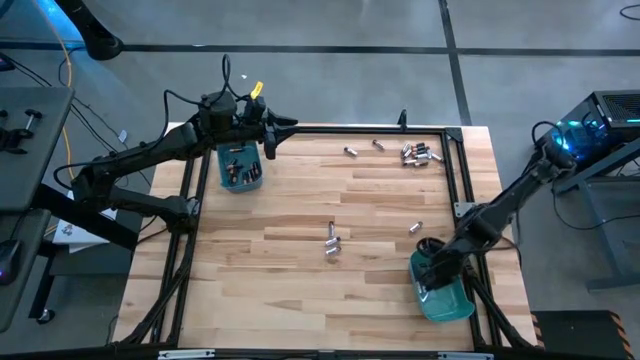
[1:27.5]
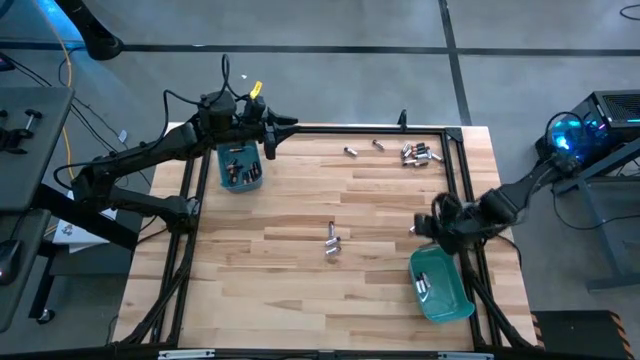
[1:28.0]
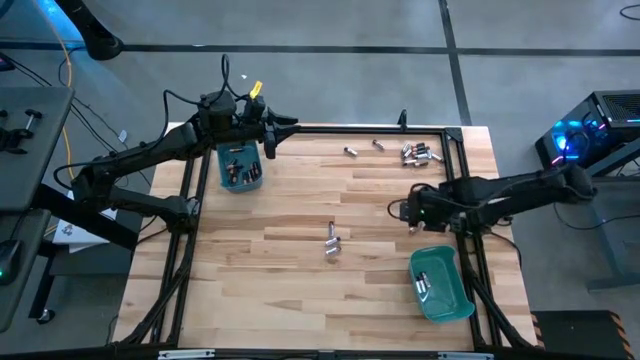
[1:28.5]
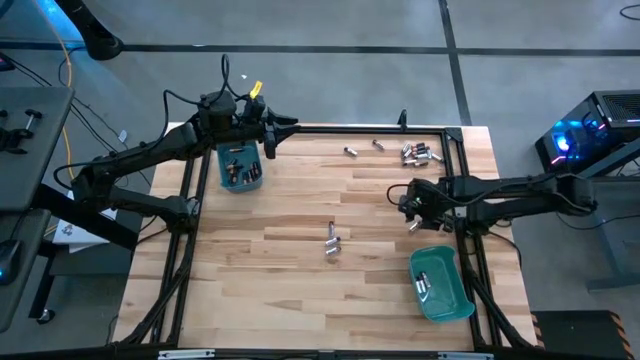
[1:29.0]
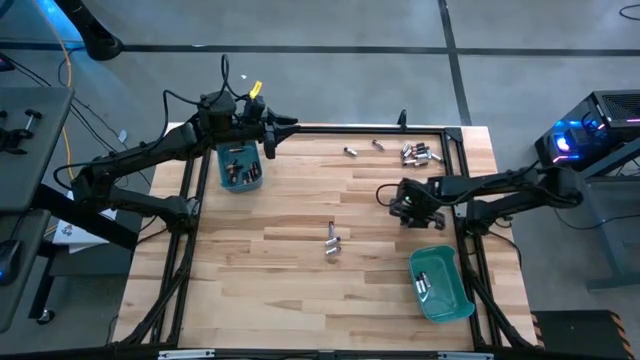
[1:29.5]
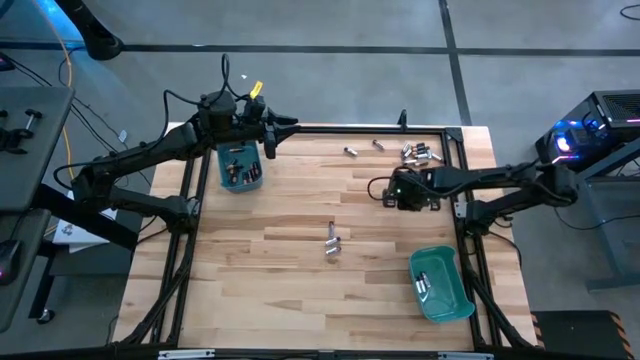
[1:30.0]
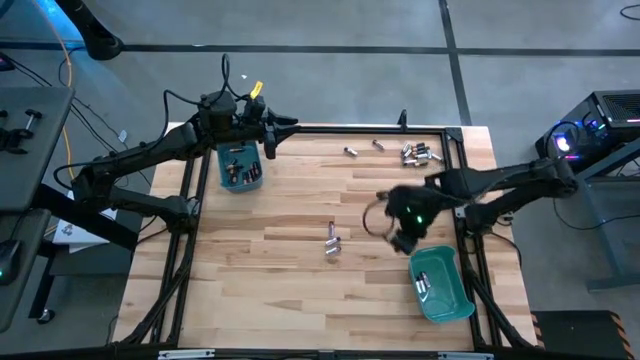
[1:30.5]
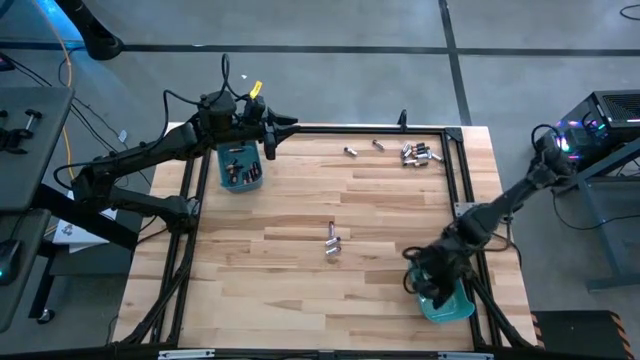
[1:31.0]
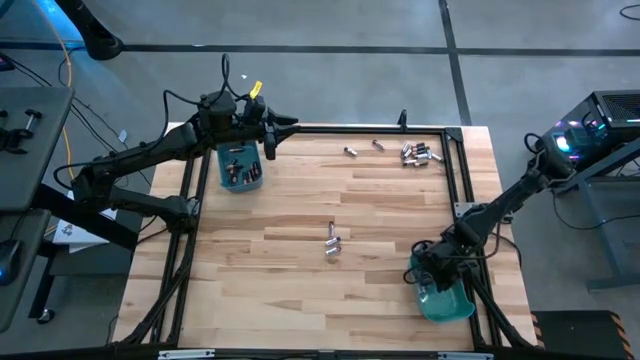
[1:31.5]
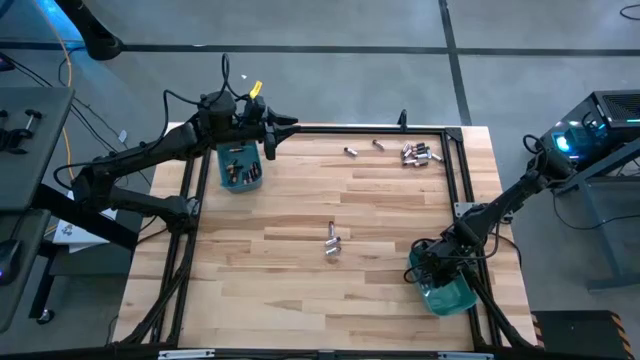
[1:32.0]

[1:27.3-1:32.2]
Task: Sort batteries
Put the silver battery into the green bin

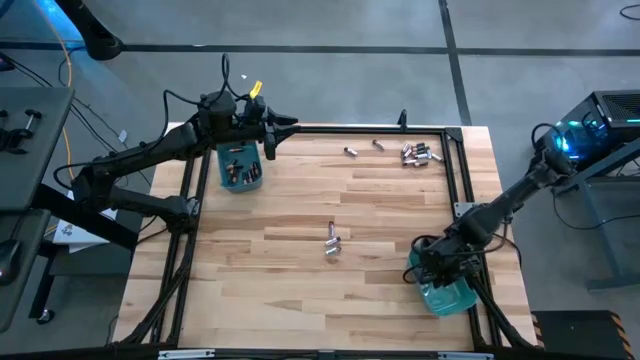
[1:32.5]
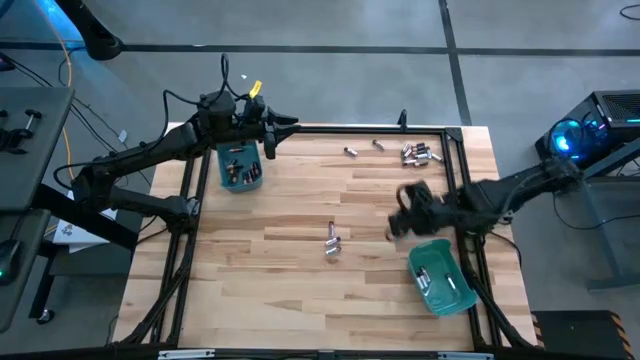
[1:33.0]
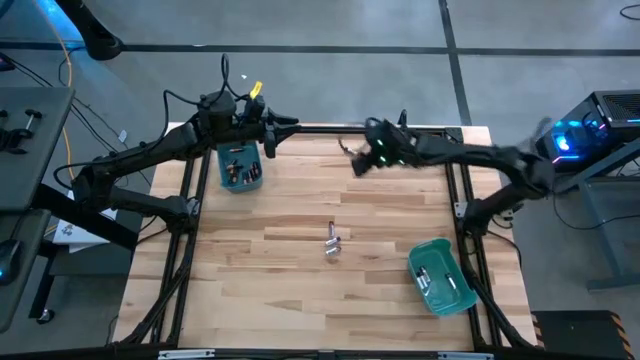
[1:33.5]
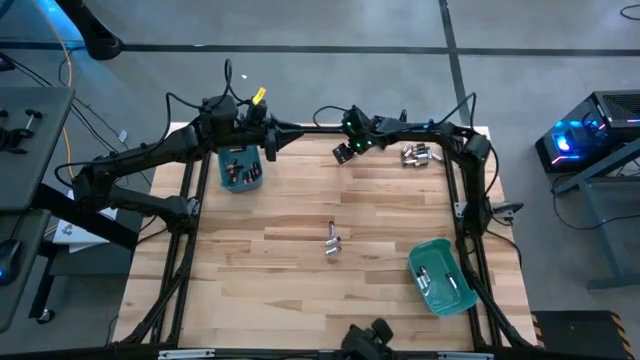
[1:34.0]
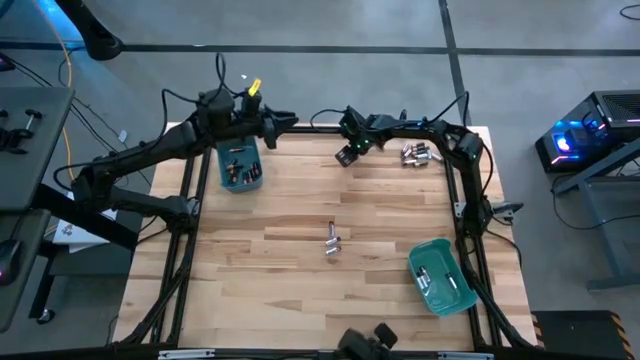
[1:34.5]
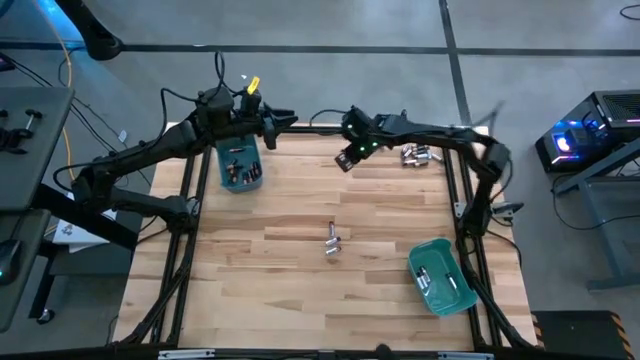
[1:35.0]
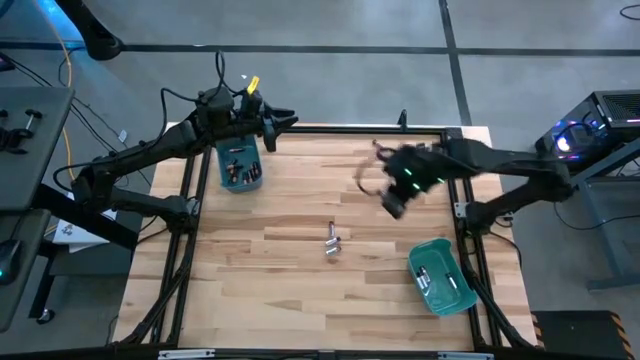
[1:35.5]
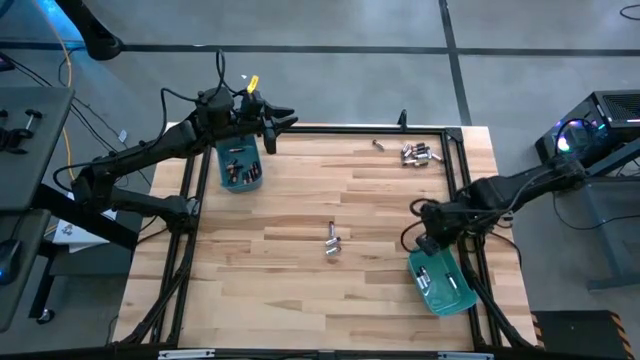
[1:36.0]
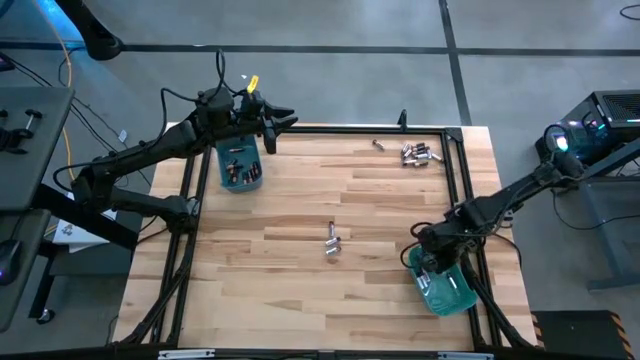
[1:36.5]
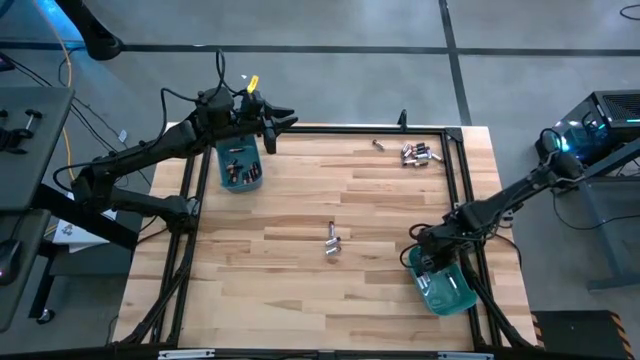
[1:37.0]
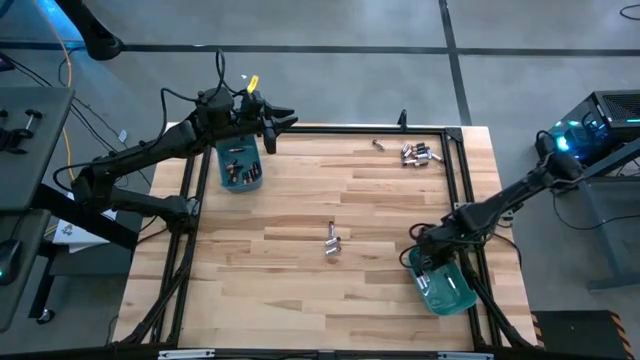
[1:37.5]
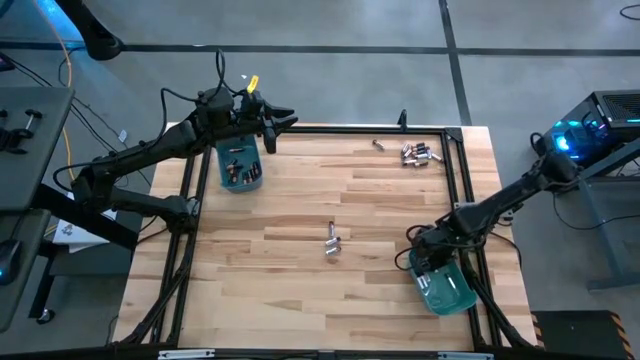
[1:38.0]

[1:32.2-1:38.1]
Put the silver battery into the green bin

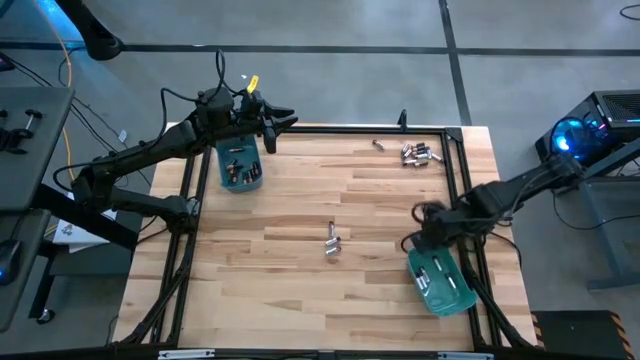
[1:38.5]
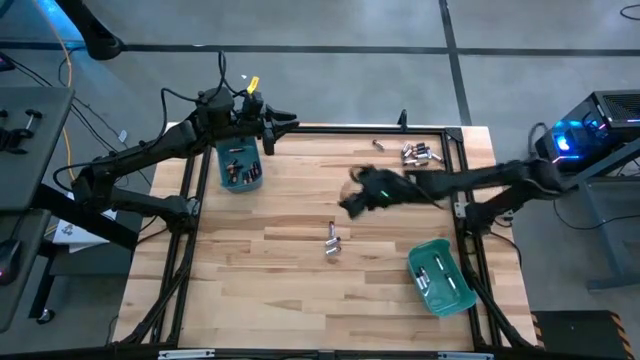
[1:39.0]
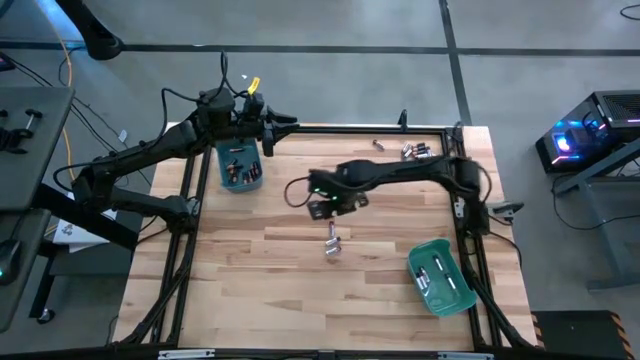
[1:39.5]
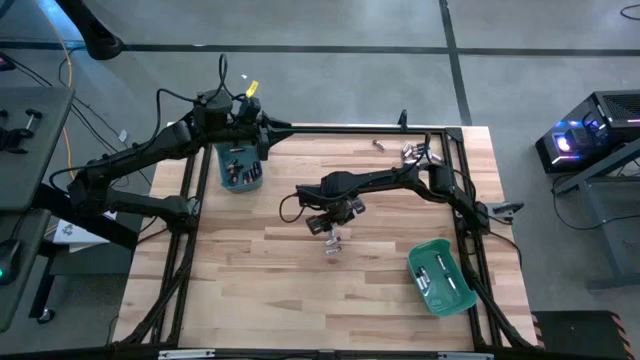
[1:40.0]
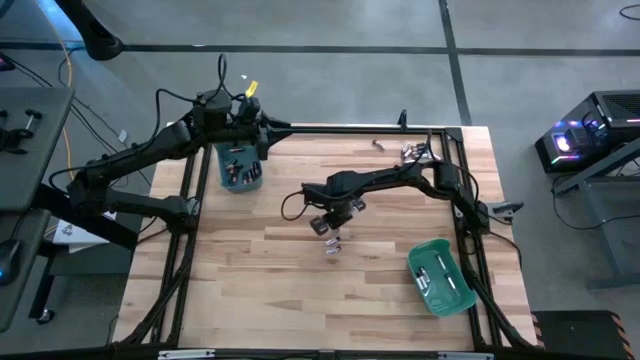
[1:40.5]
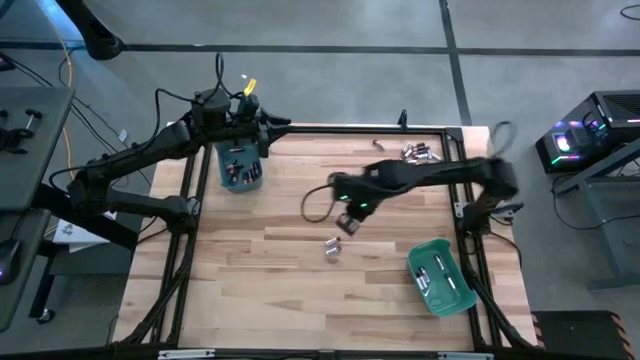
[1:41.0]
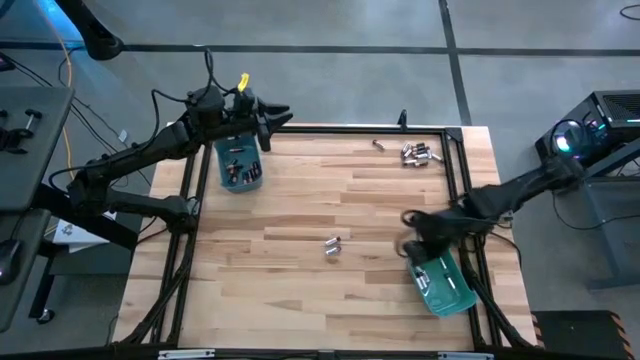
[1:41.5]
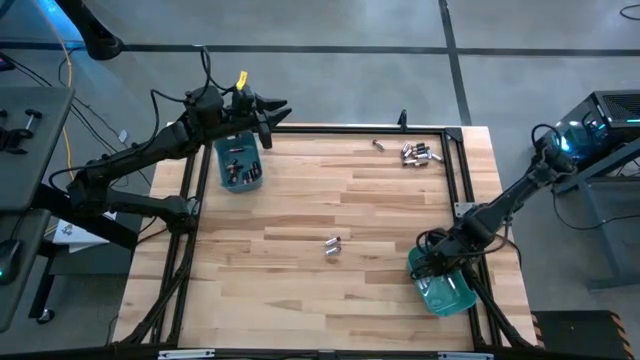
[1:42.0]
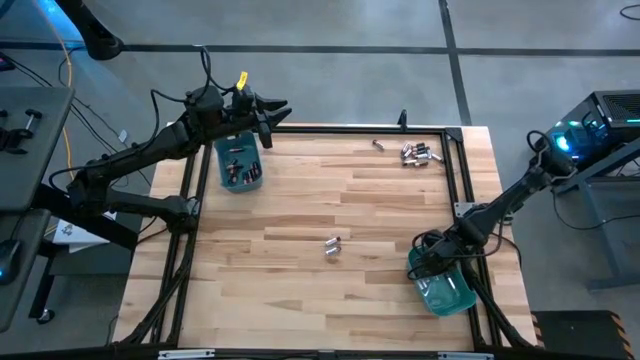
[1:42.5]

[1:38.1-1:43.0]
Put the silver battery into the green bin

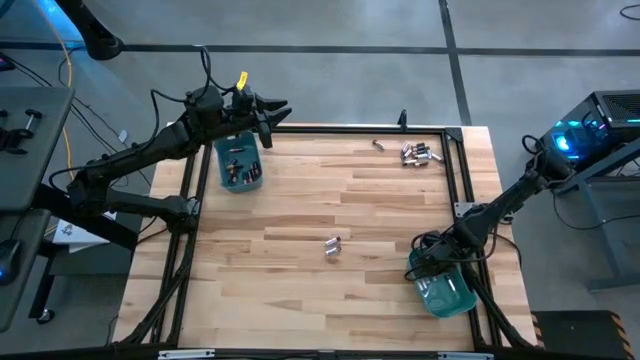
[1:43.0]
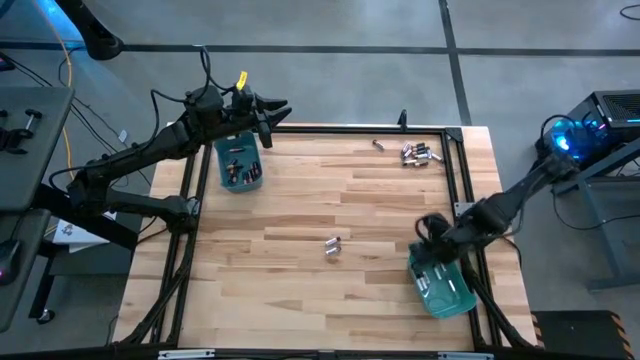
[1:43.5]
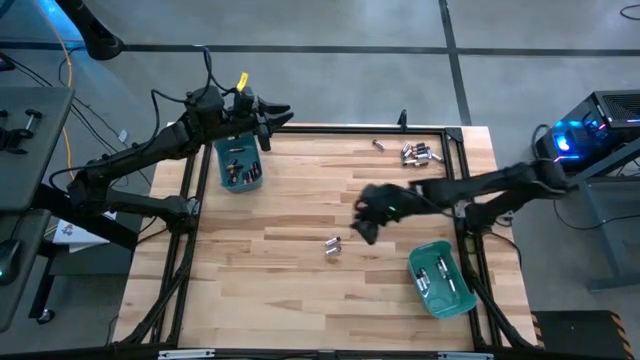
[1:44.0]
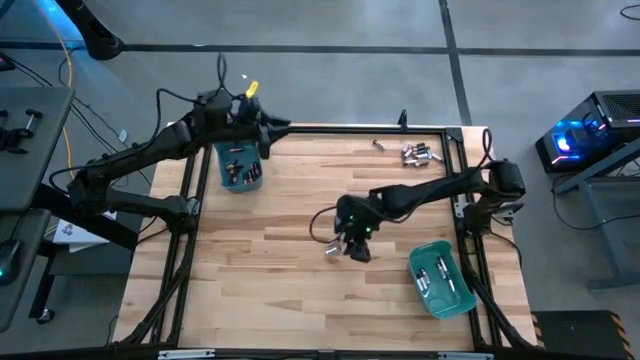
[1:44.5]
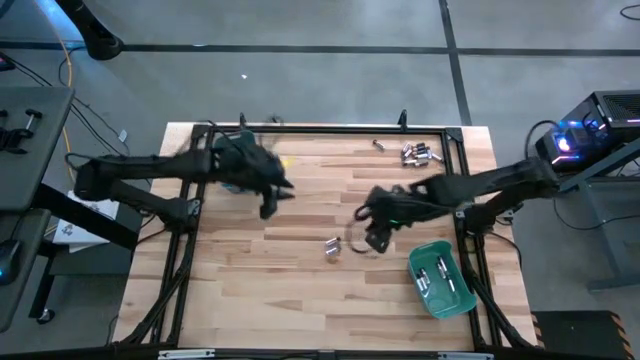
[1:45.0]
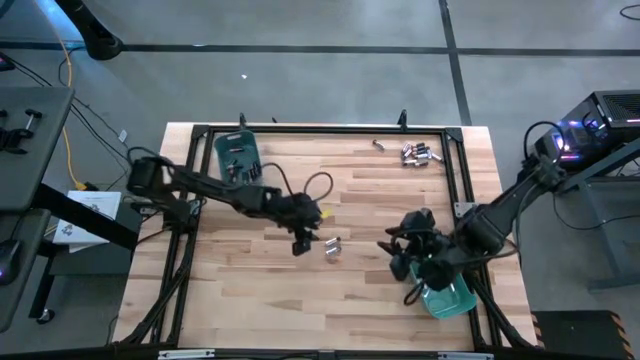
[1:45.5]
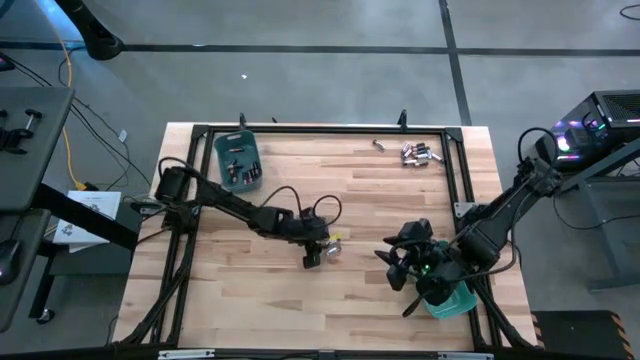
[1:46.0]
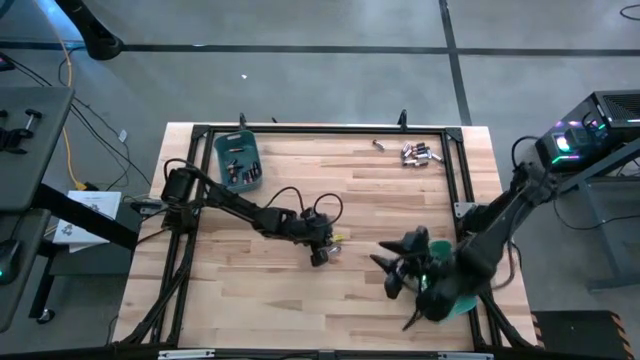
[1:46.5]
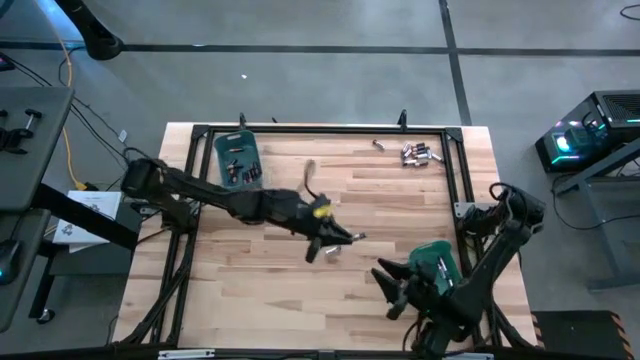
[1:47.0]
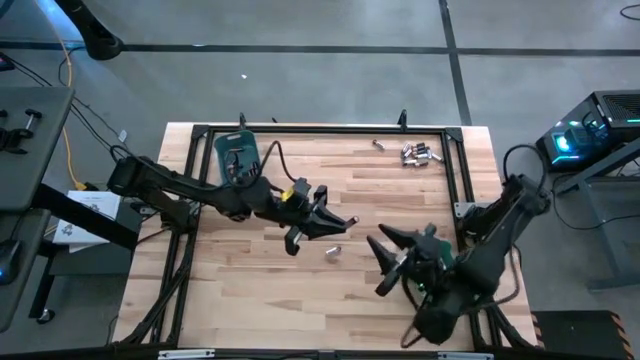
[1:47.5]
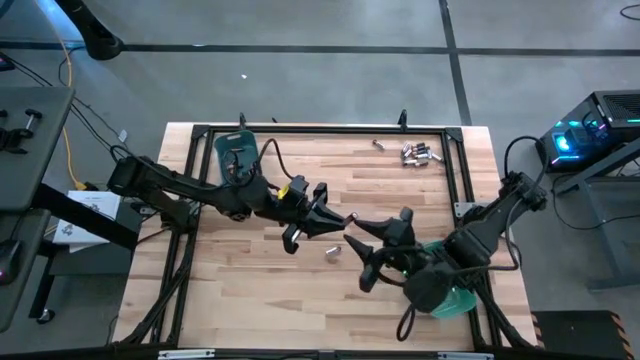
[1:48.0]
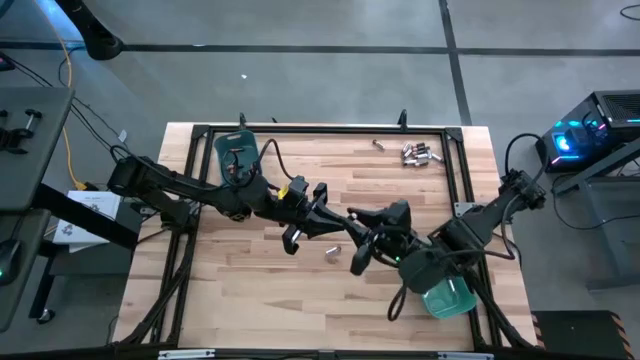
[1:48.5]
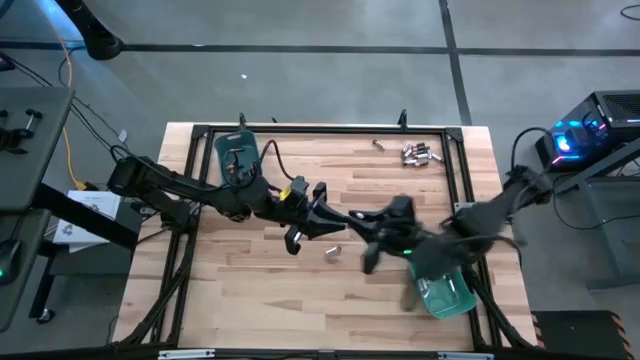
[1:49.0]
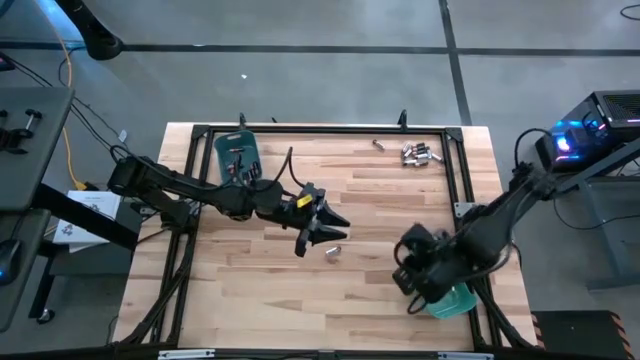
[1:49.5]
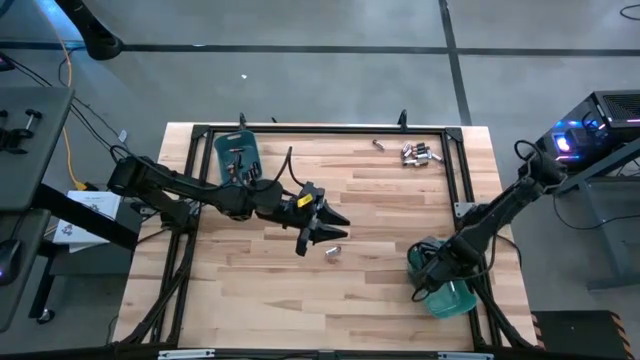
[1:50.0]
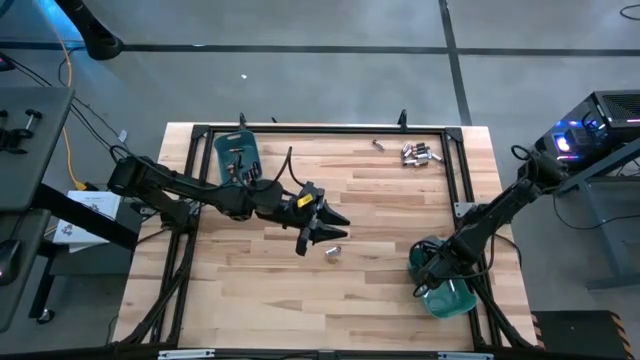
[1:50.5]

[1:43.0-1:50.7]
Put the silver battery into the green bin
